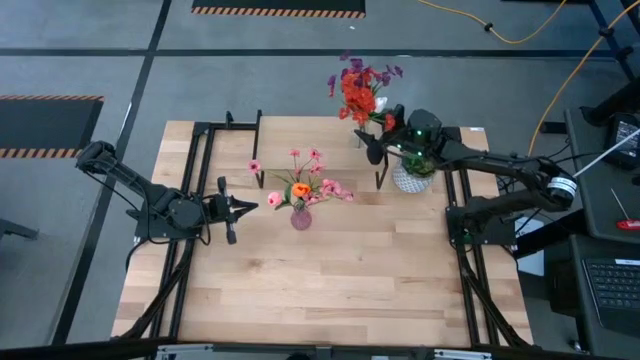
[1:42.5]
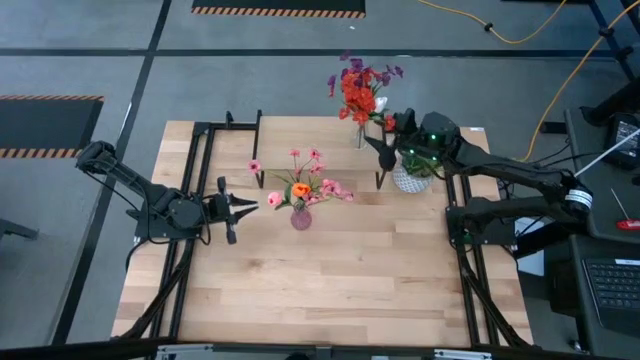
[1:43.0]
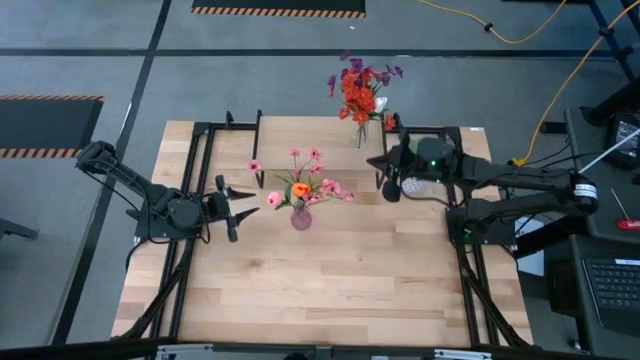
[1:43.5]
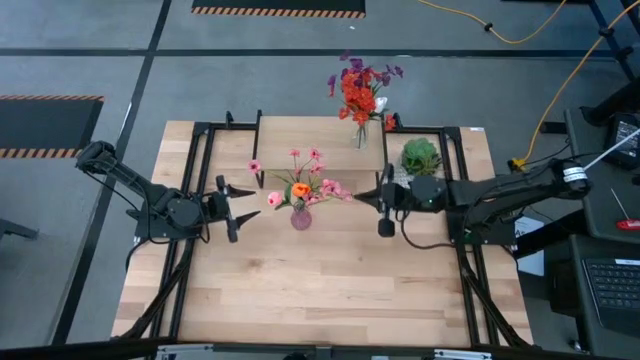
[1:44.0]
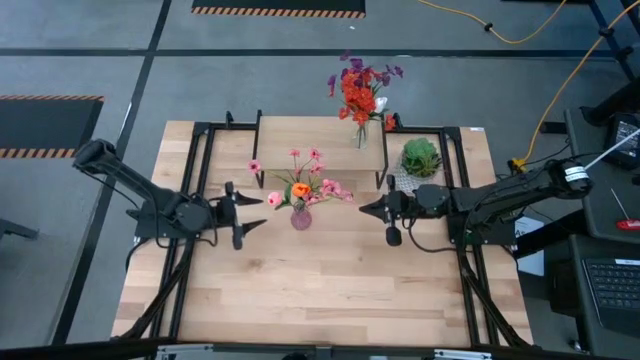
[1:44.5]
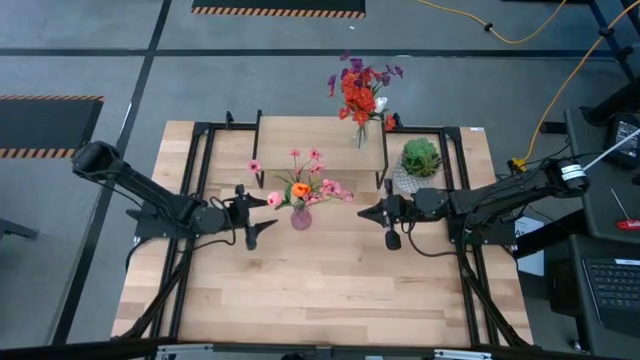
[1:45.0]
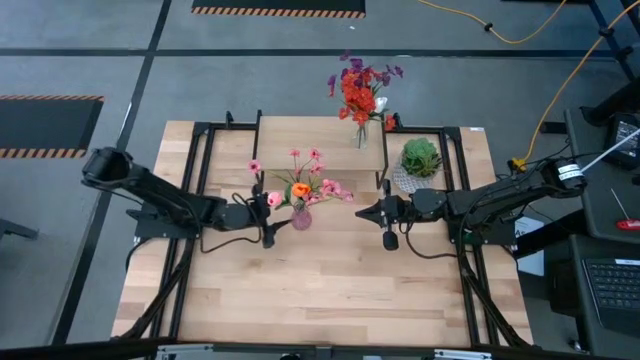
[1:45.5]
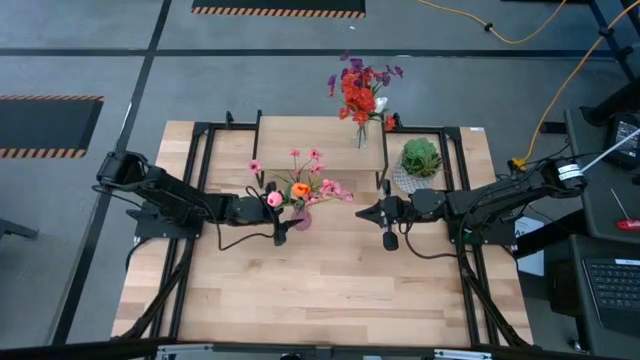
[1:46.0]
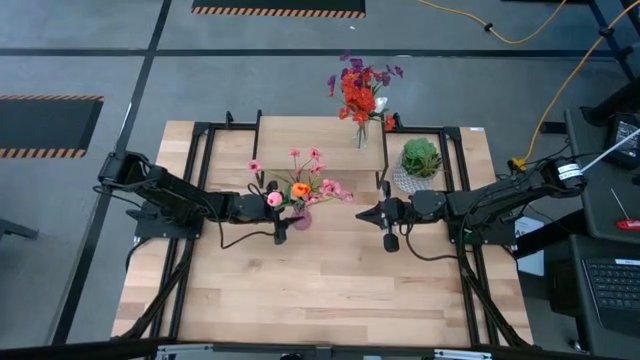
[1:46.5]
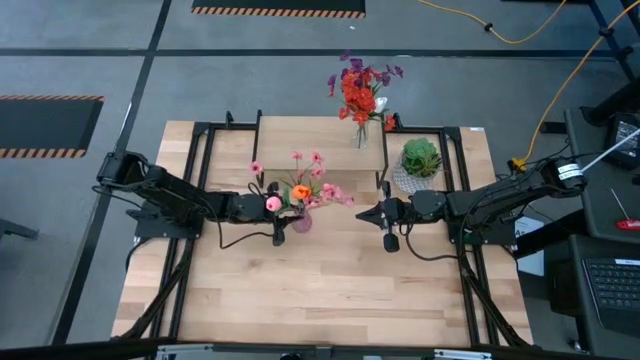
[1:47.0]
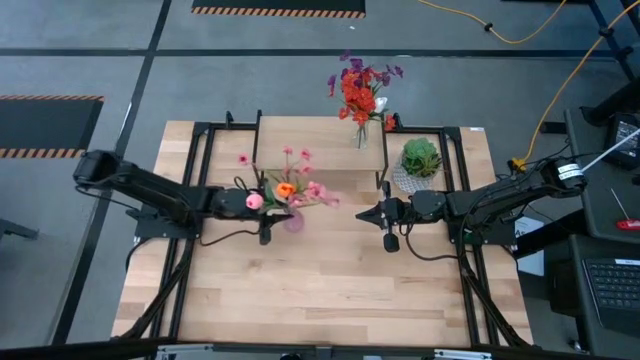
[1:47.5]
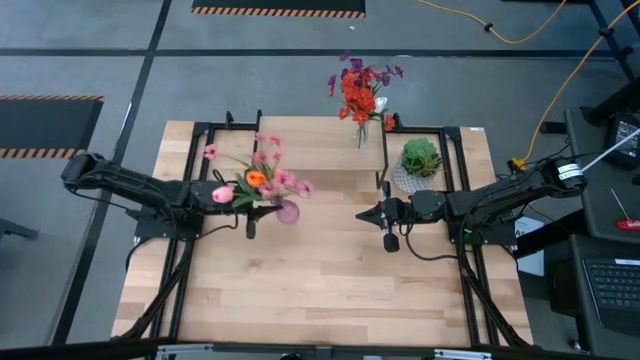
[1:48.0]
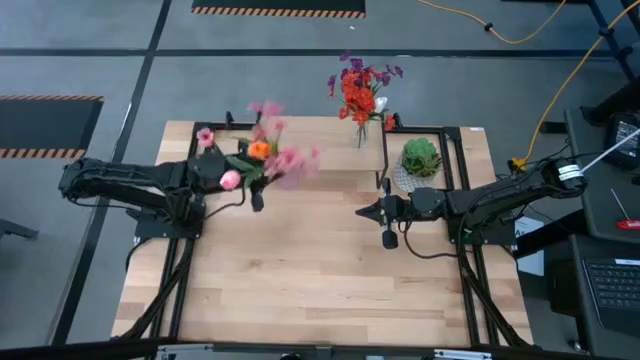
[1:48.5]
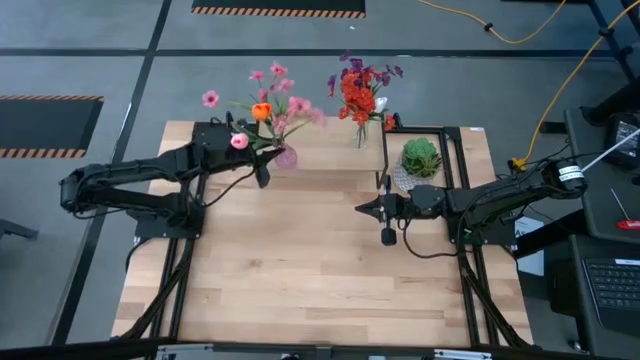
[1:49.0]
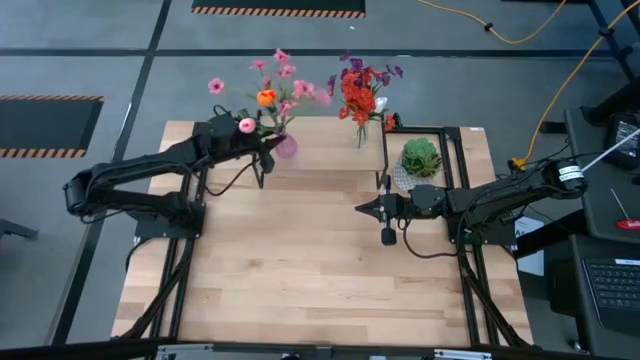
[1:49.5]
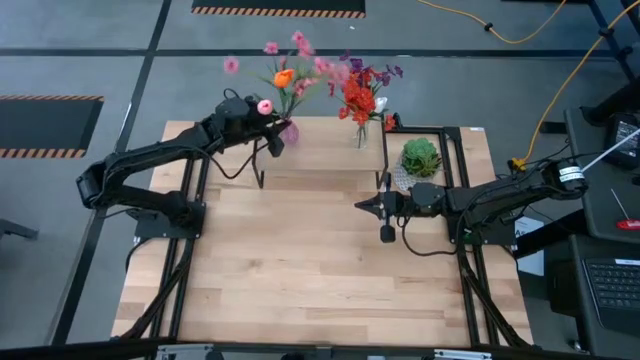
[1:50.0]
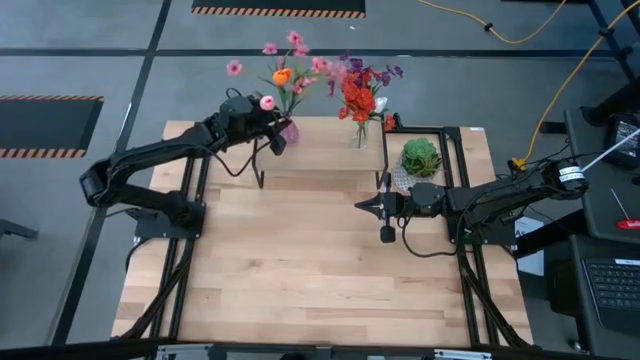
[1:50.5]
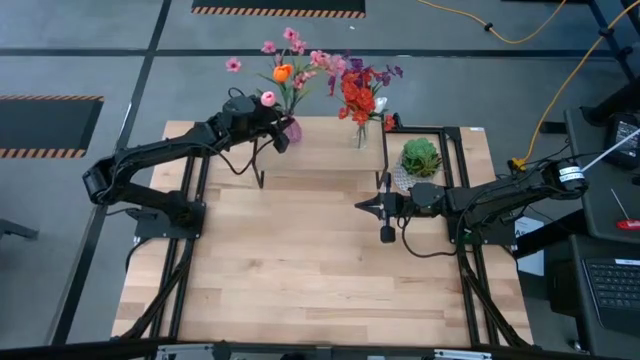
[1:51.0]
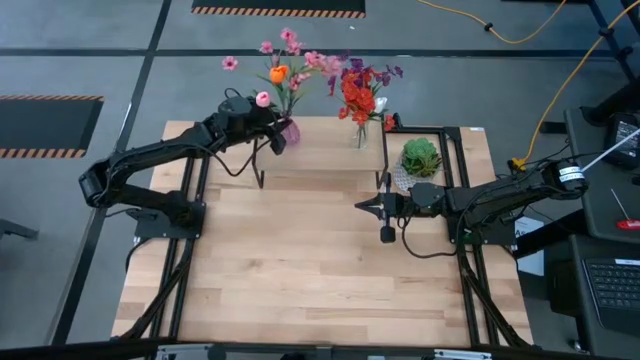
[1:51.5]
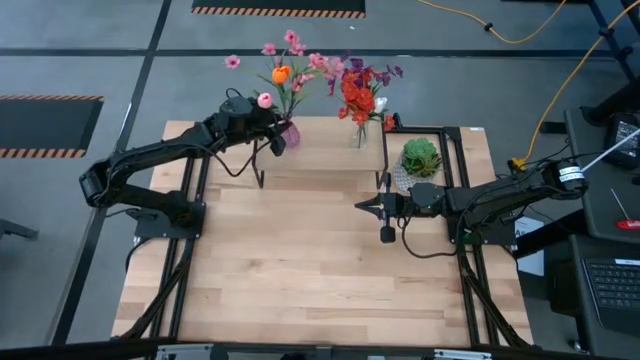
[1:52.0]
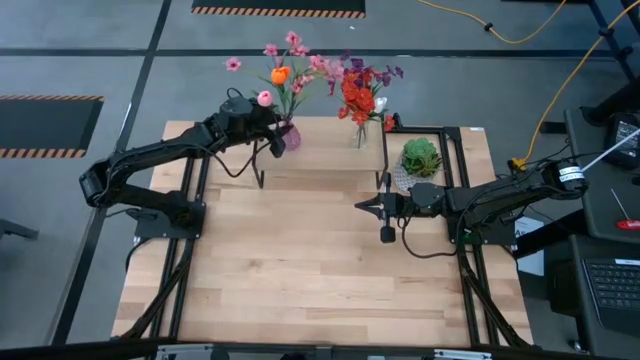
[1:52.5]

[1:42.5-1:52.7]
Task: Pick and place flowers into a vace then onto a shelf
Put the purple vase with flowers on the shelf

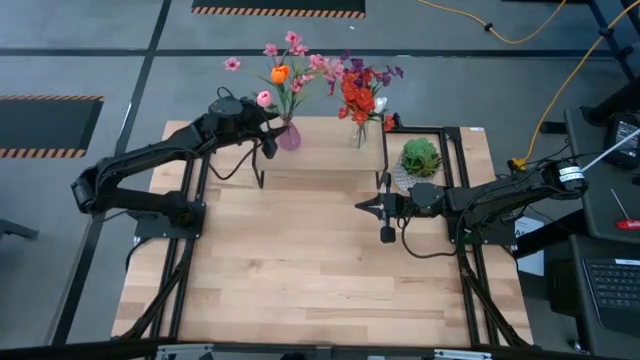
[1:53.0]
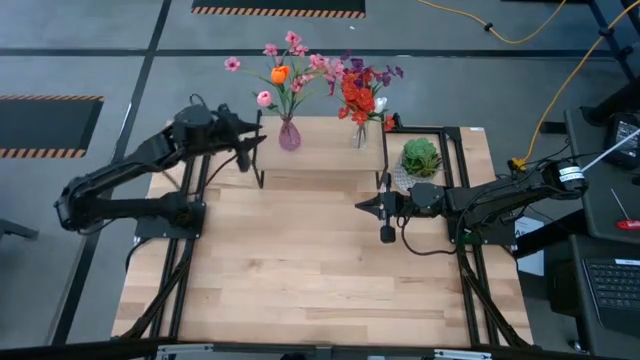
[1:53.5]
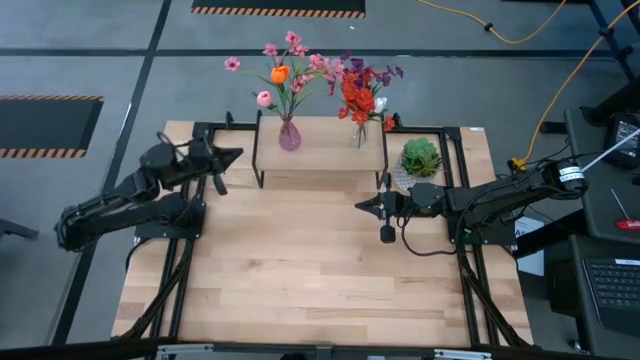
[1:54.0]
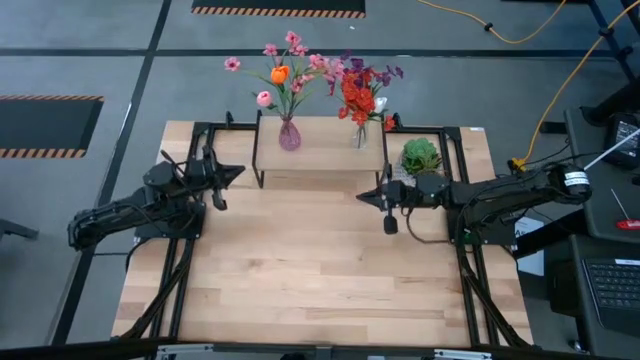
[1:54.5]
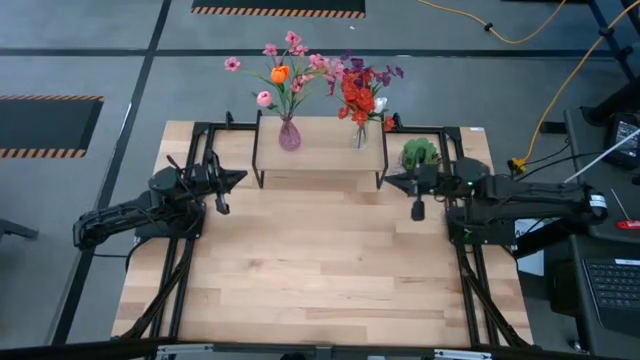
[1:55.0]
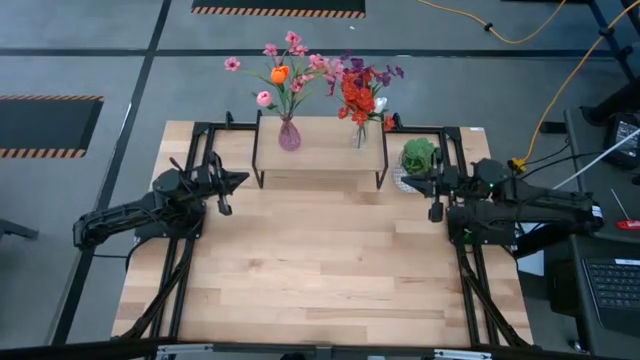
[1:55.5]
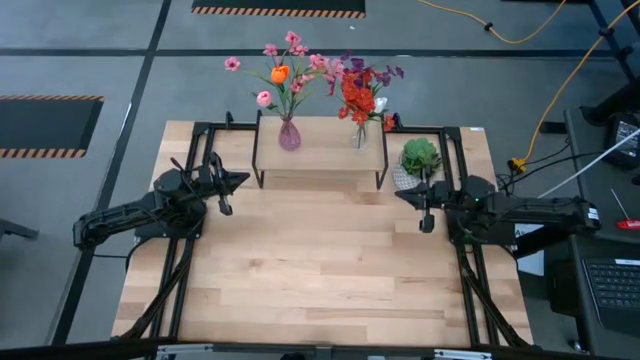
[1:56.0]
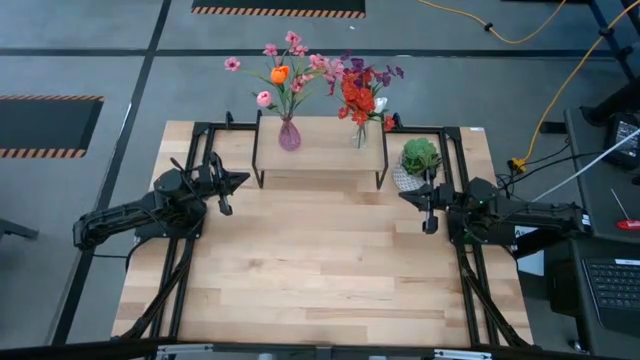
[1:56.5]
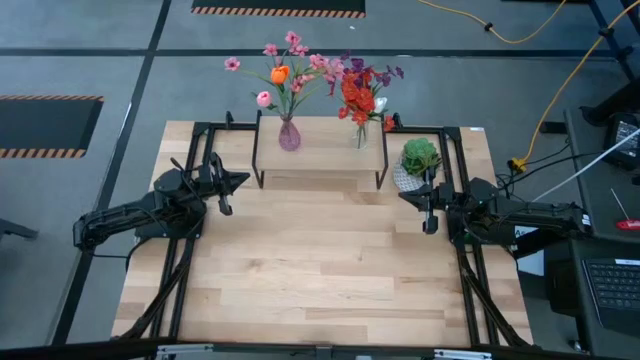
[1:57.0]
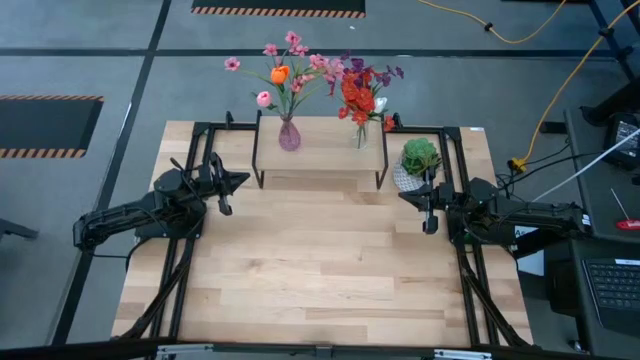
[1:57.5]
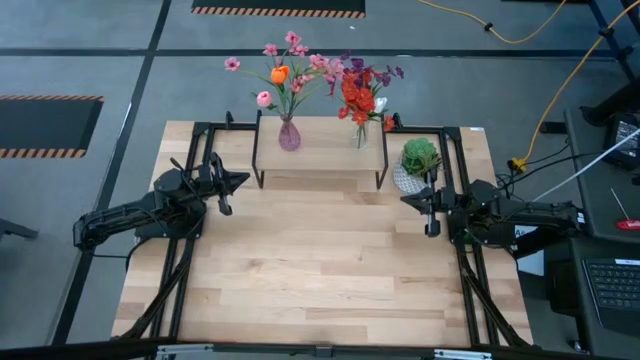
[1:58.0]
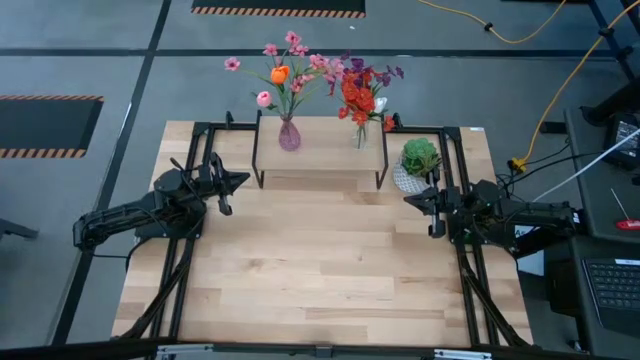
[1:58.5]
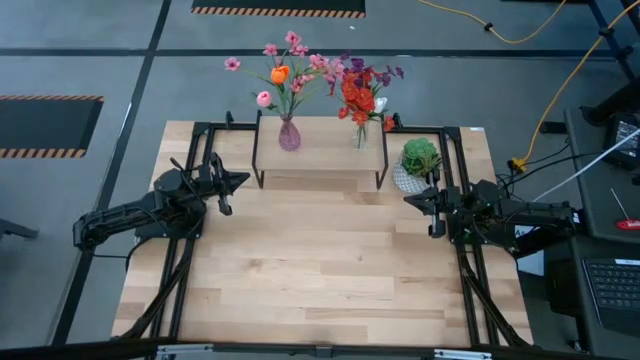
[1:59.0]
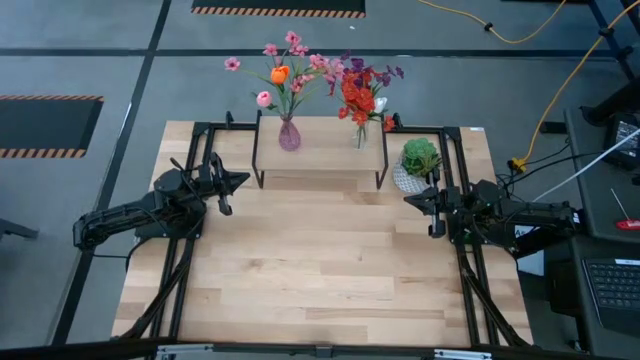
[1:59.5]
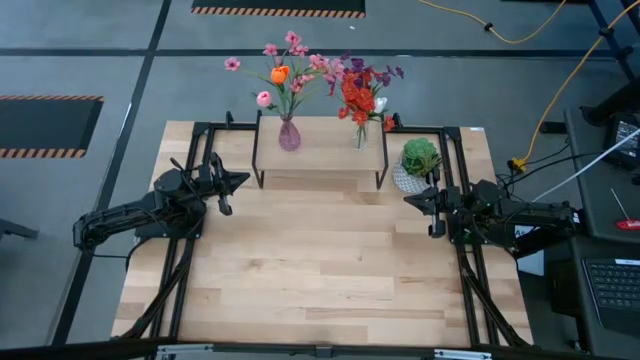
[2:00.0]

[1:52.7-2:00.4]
Return to Home Position
